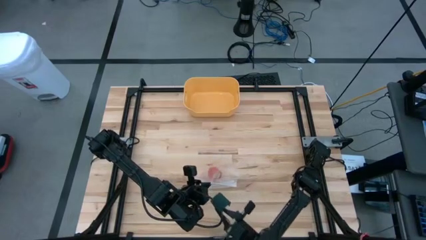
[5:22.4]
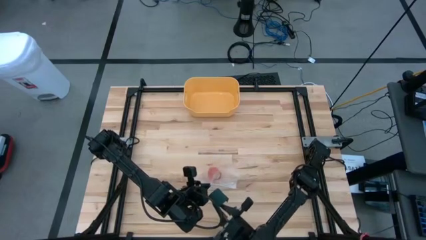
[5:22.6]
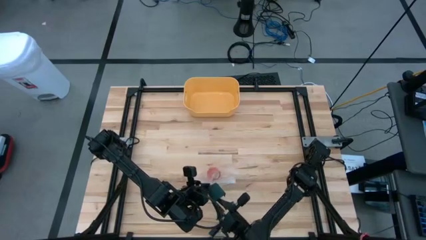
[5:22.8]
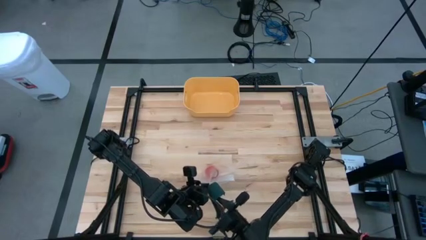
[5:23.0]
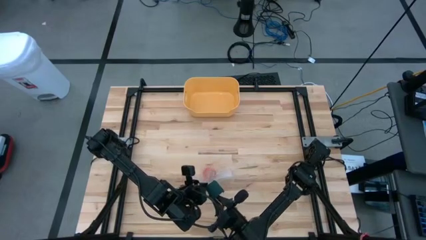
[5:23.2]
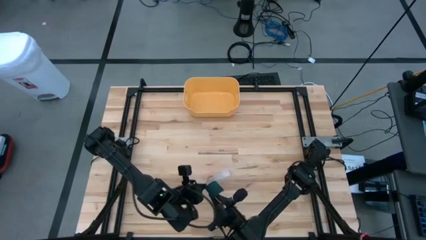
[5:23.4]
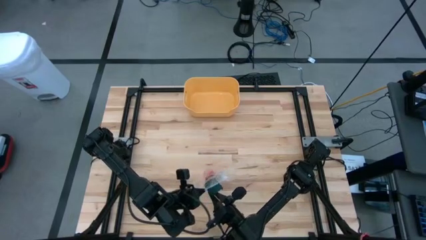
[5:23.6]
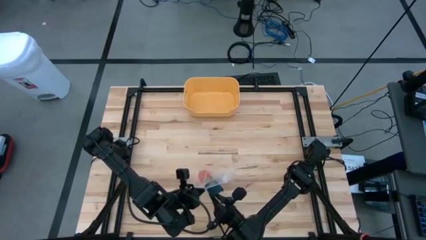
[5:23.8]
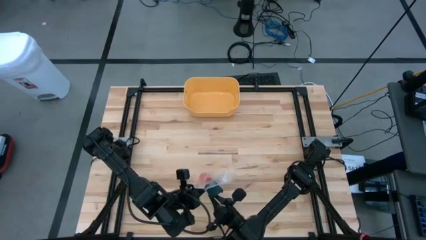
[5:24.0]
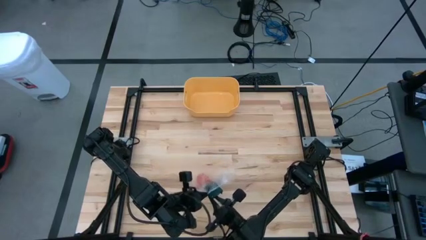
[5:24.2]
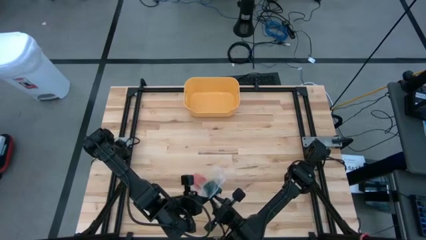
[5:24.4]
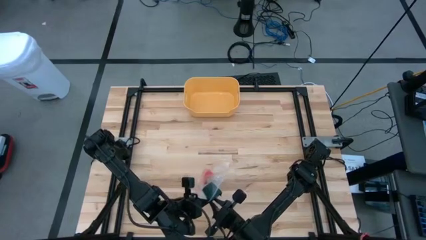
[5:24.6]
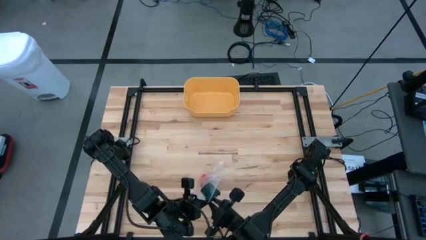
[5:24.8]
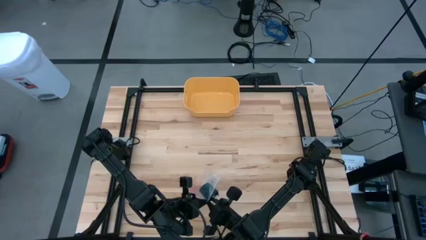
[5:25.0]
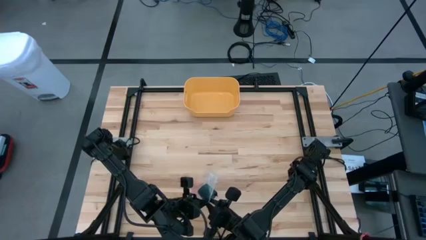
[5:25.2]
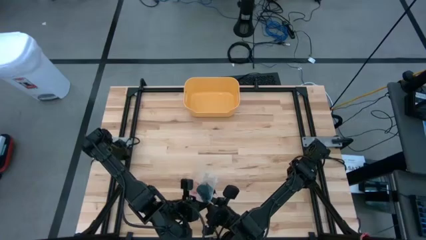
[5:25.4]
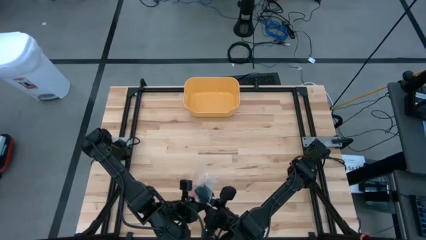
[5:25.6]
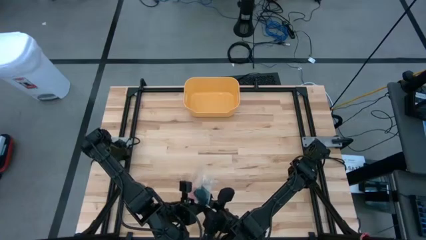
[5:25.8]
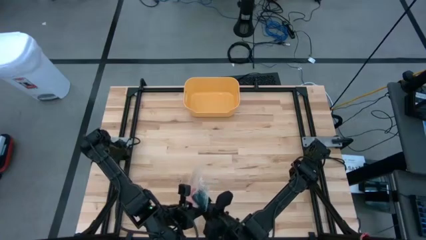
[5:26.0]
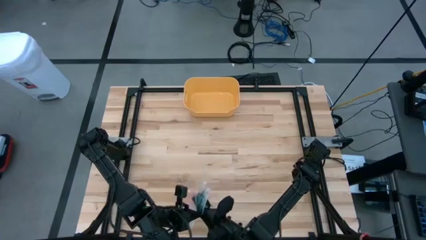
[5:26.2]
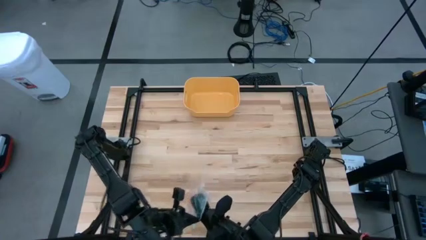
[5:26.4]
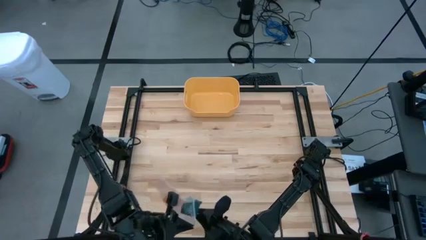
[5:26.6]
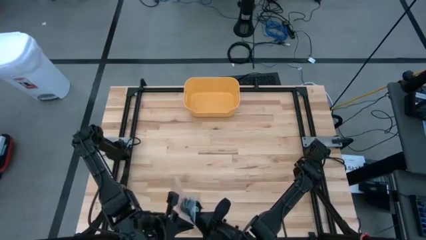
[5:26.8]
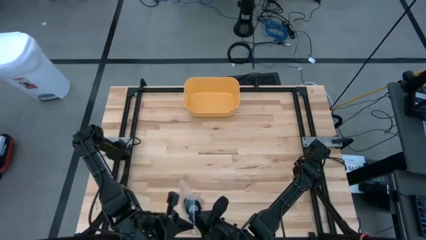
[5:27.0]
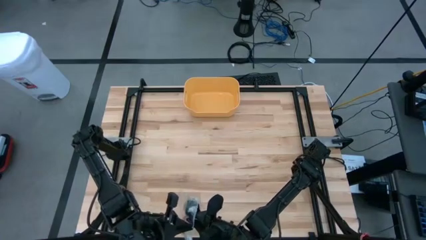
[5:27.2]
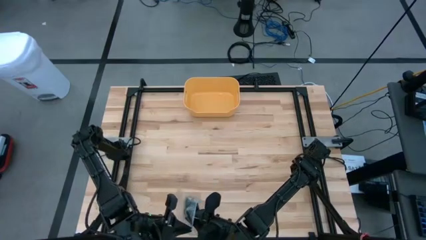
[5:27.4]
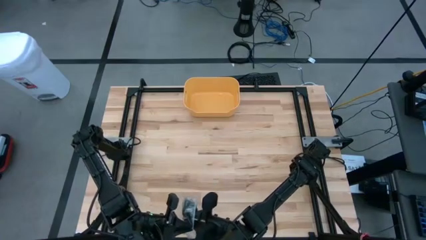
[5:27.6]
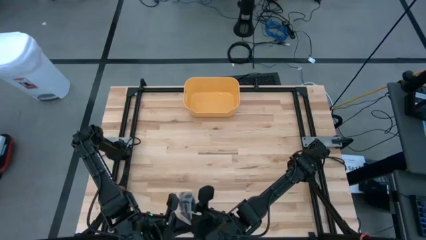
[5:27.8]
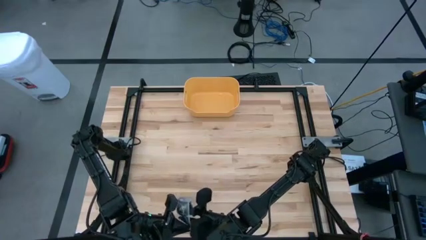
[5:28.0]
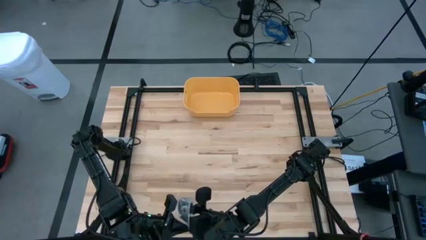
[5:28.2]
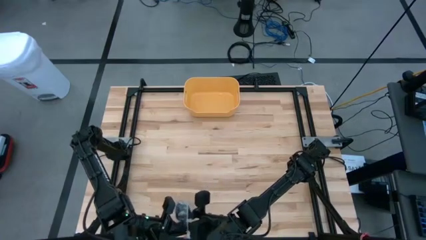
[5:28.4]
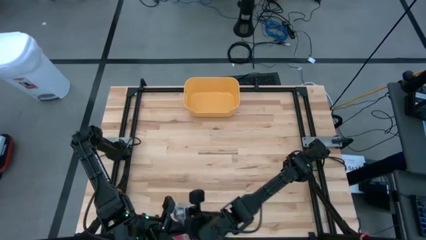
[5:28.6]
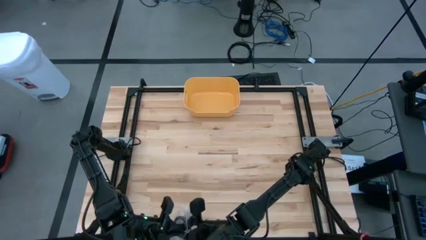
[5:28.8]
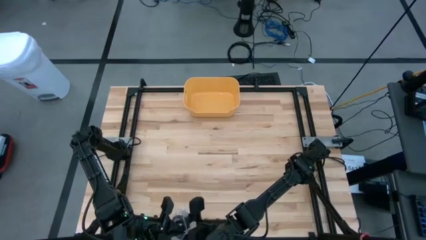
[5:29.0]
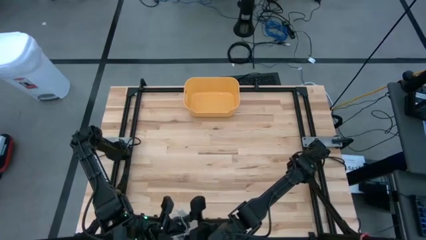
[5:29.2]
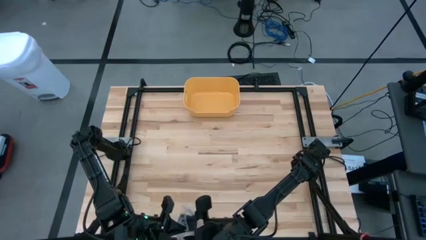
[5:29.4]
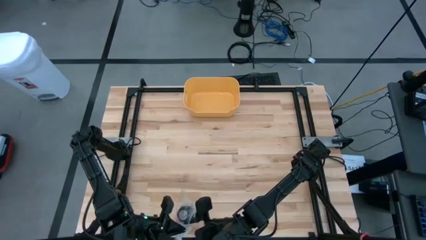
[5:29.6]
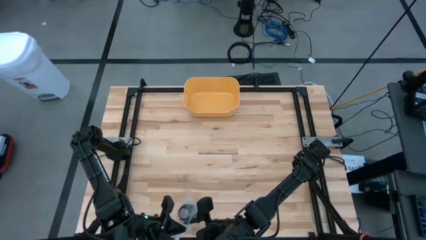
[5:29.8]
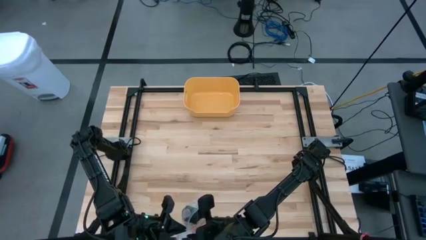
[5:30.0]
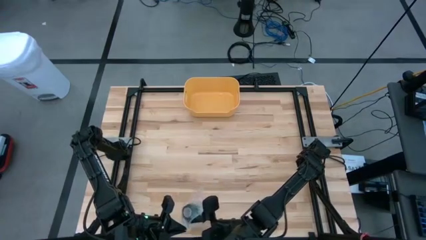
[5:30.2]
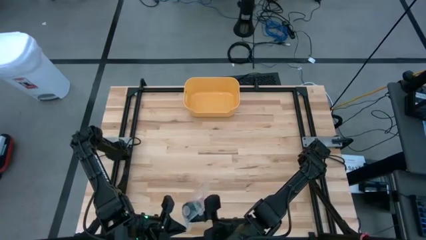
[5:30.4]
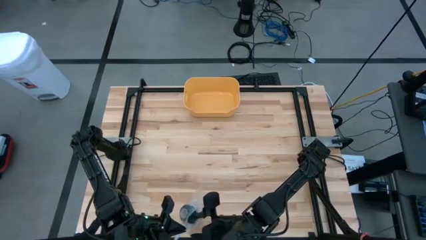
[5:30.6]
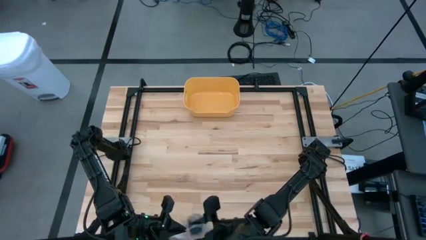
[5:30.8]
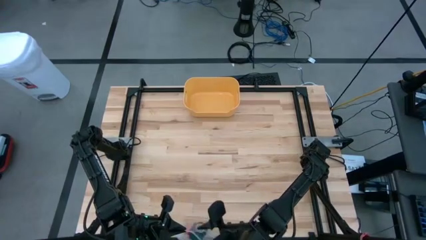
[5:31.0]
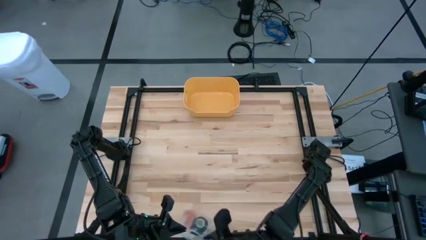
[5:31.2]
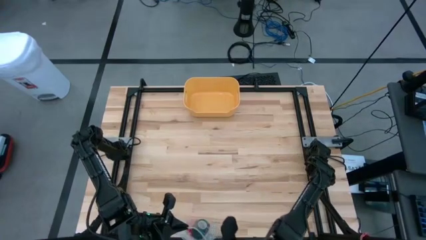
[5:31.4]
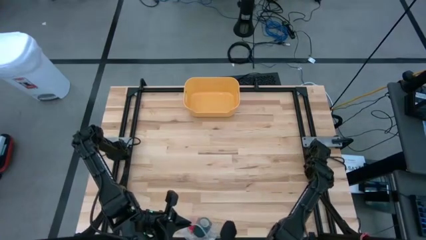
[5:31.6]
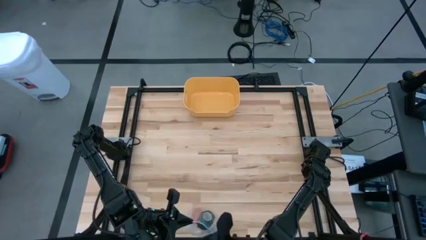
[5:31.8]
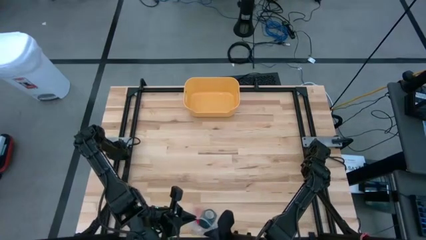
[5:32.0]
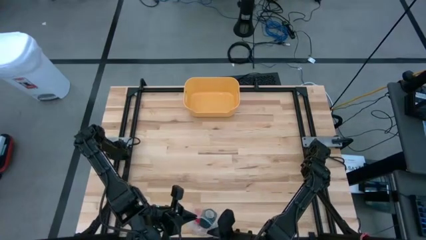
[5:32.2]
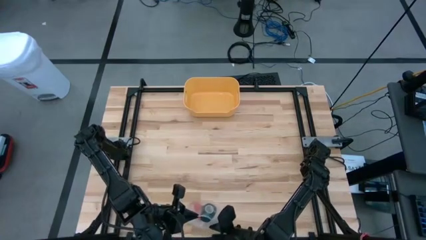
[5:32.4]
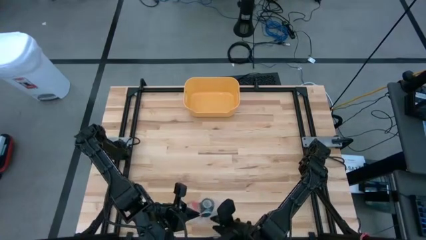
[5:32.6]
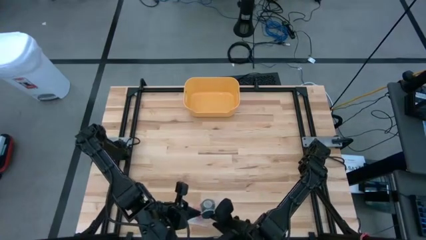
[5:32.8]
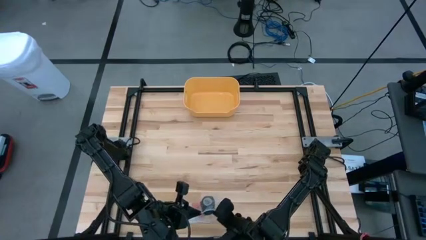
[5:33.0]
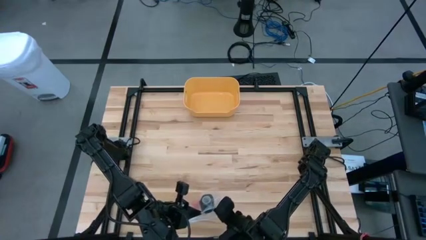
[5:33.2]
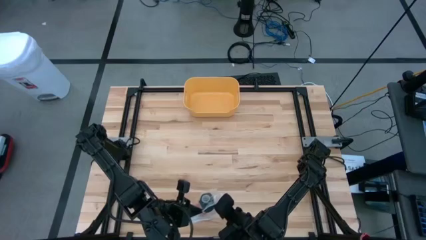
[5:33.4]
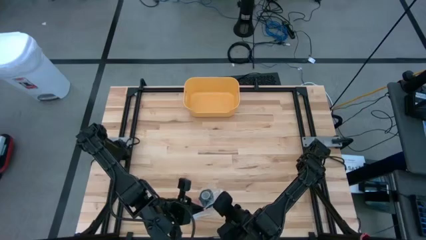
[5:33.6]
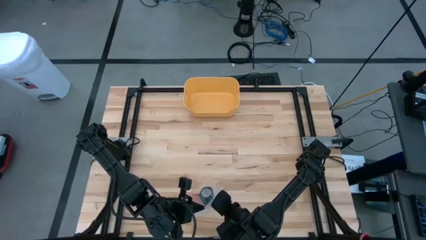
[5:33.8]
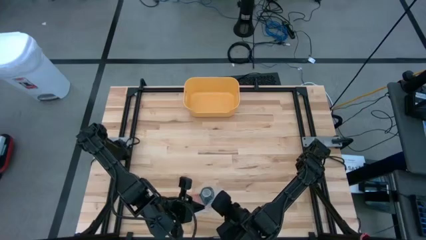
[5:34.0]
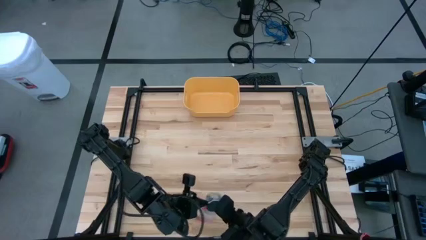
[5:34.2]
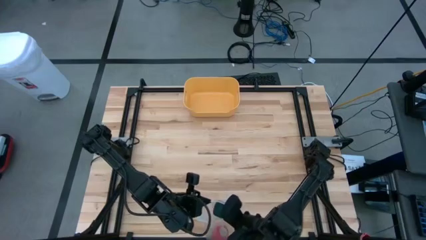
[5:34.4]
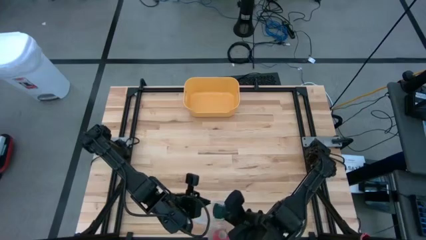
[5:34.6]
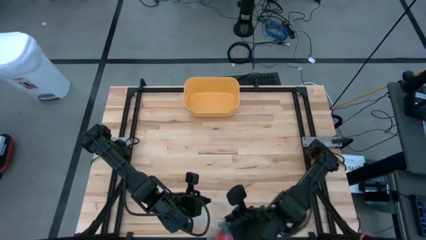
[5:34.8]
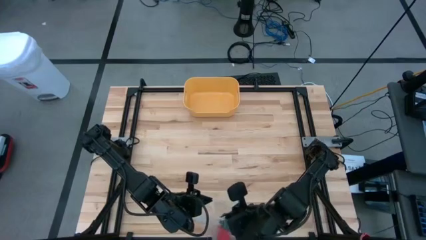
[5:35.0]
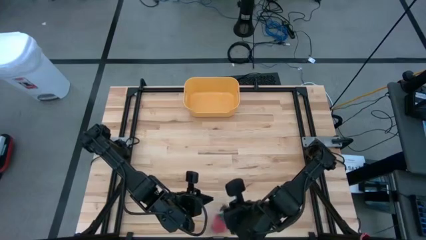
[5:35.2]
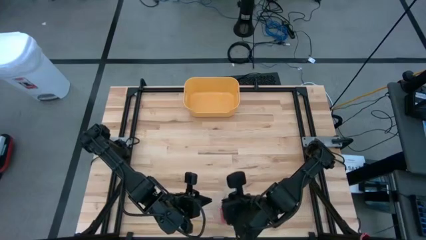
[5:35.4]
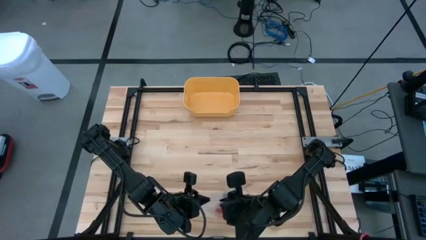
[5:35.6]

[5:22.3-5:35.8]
Task: Roll bandage
Put the rolled green bandage into the transparent zip bag

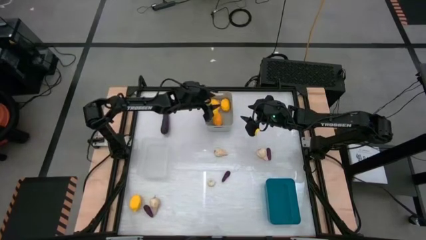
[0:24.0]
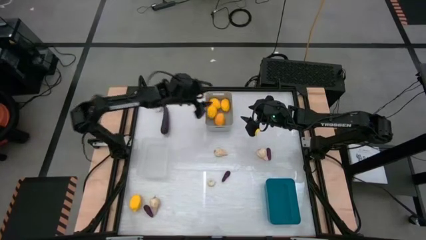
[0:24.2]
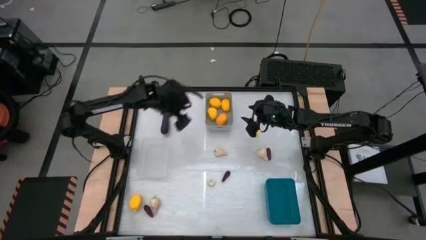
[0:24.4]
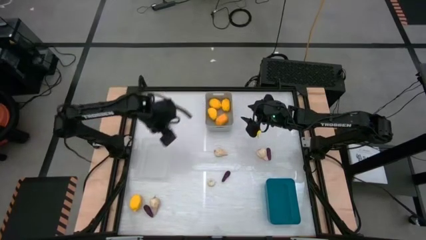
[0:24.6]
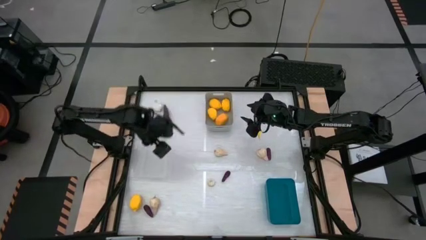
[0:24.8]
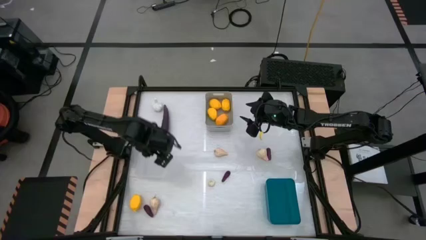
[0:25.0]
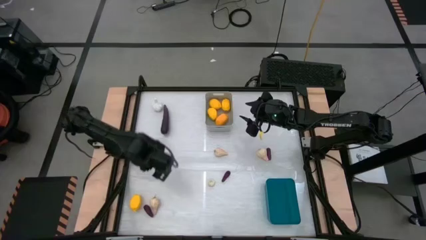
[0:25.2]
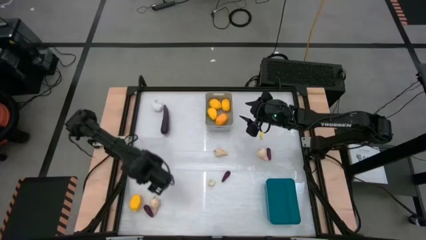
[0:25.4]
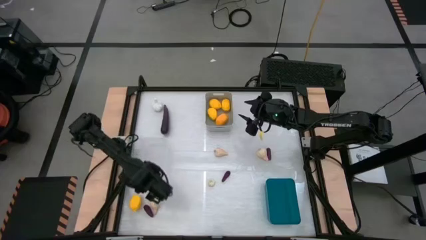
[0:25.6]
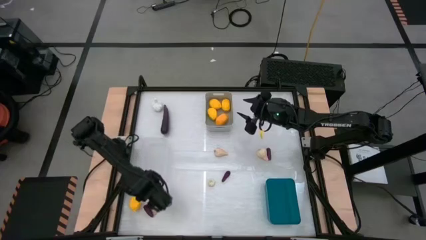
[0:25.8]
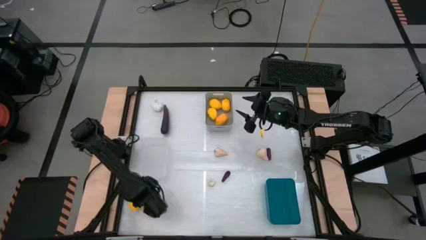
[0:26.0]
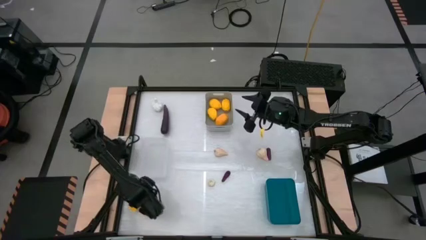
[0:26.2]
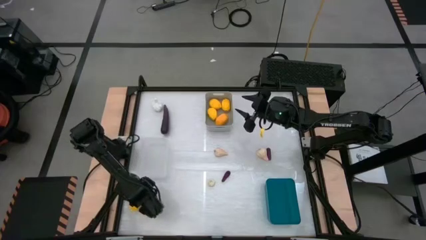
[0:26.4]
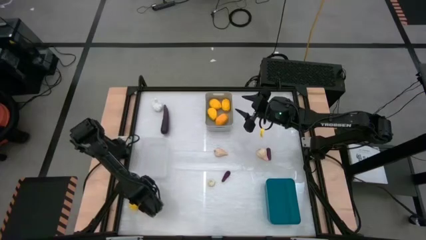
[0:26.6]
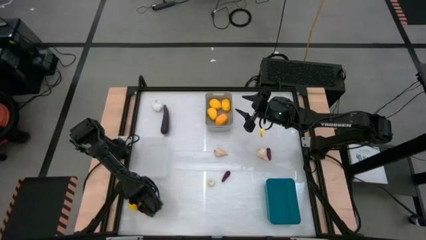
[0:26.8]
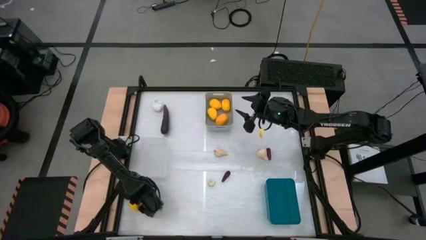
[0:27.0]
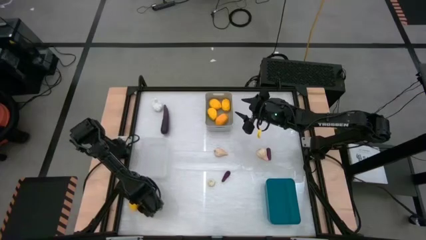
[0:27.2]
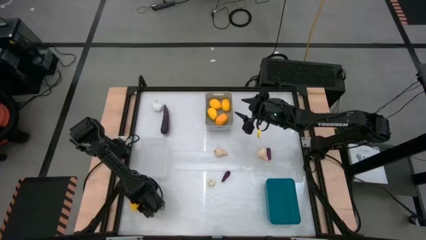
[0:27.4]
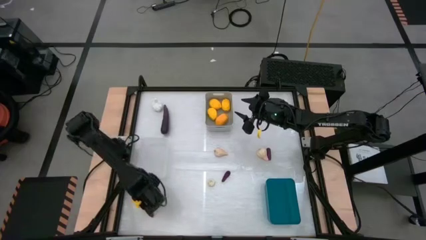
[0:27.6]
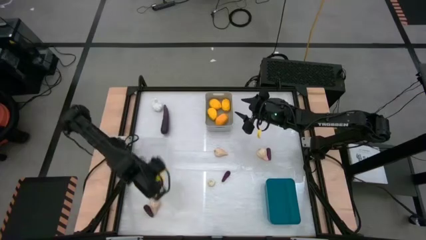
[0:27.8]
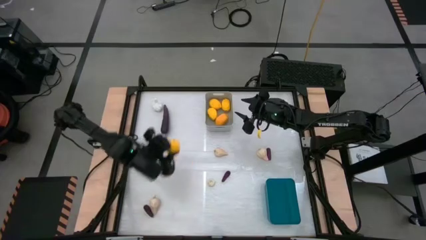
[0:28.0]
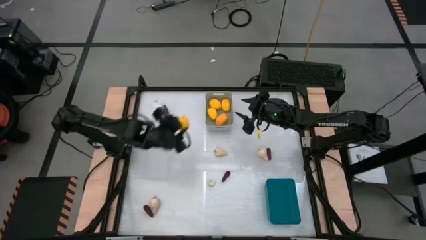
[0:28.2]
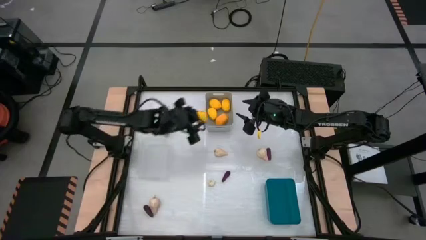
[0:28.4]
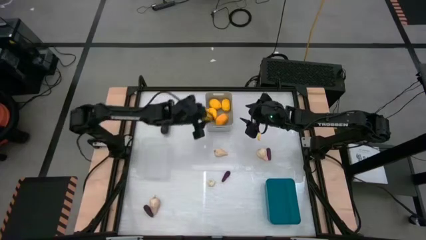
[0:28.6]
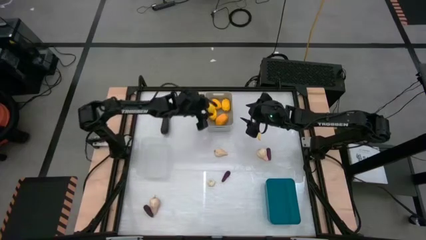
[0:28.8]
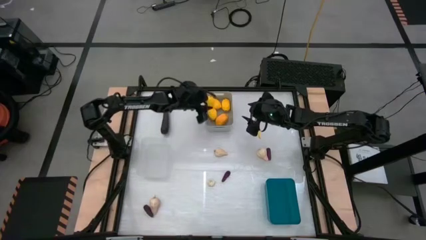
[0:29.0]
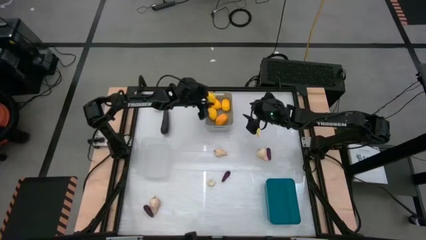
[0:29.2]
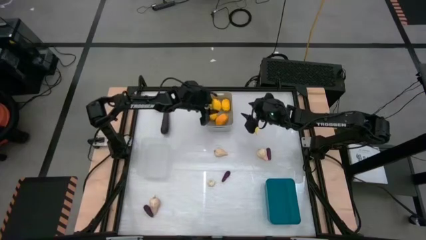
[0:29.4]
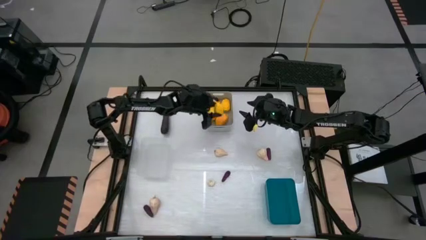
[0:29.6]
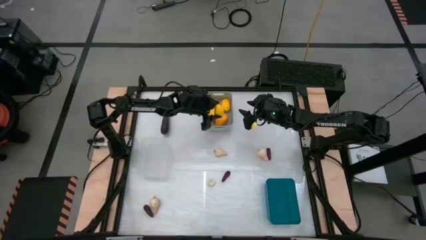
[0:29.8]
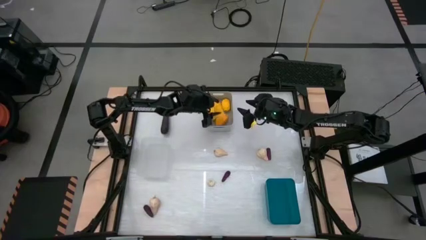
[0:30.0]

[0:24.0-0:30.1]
Task: Sort produce into baskets
Put the lemon into the gray bin
